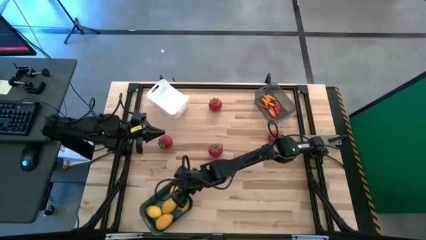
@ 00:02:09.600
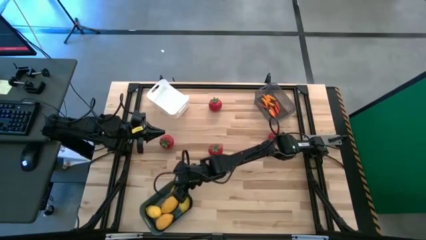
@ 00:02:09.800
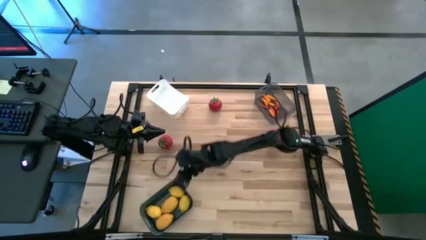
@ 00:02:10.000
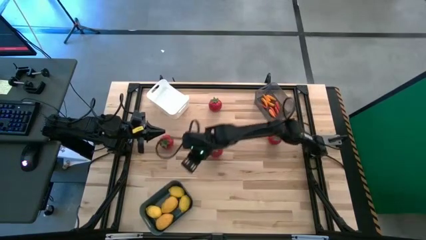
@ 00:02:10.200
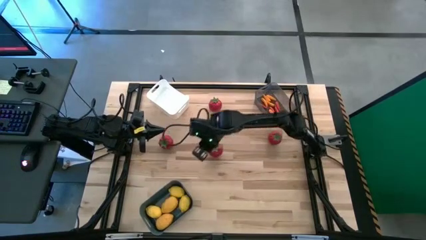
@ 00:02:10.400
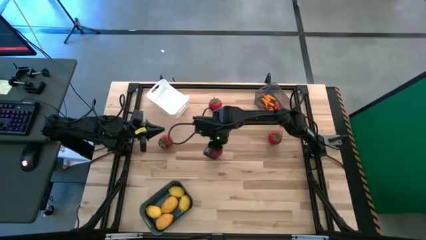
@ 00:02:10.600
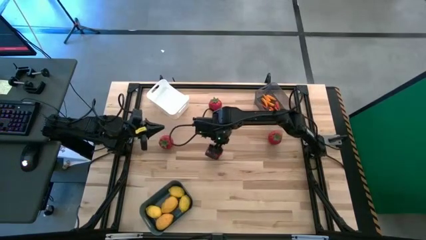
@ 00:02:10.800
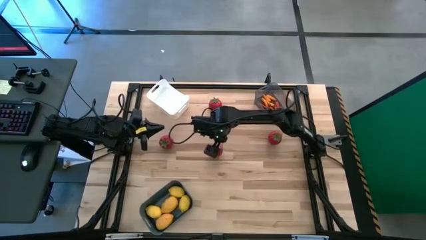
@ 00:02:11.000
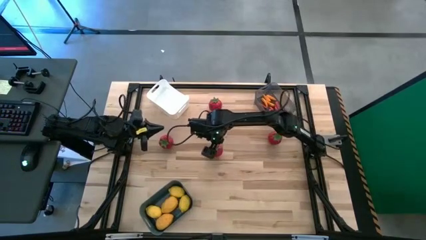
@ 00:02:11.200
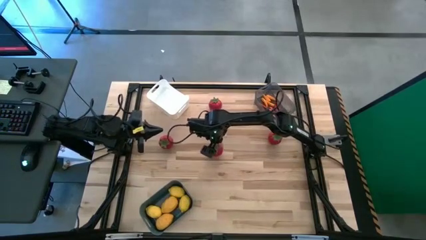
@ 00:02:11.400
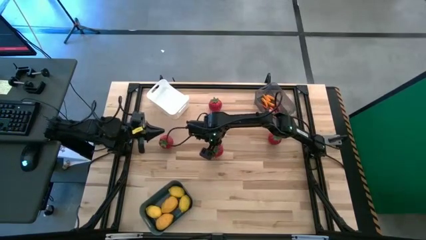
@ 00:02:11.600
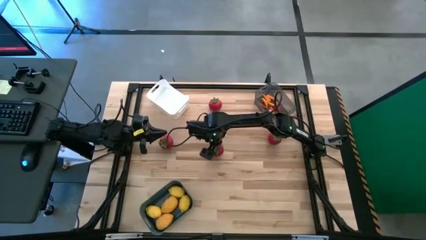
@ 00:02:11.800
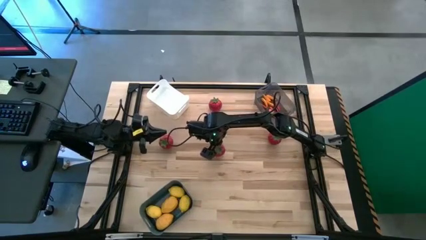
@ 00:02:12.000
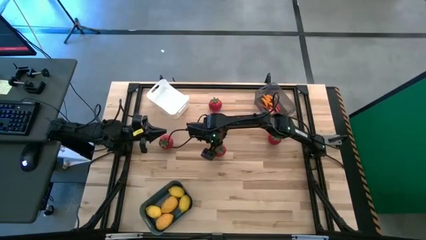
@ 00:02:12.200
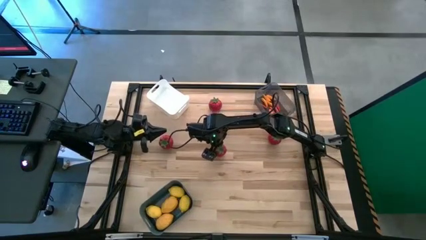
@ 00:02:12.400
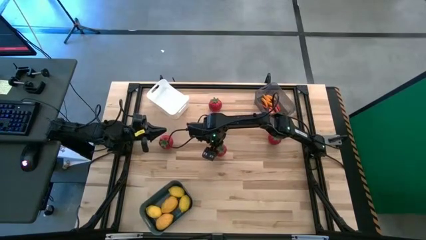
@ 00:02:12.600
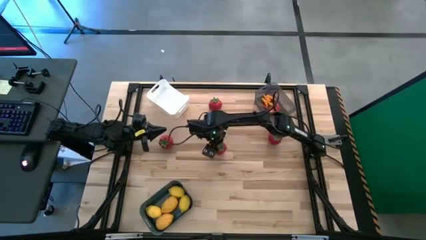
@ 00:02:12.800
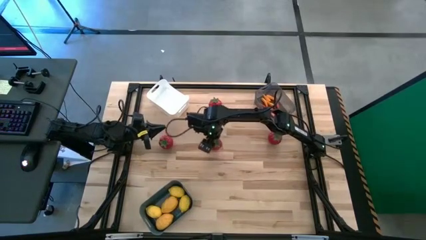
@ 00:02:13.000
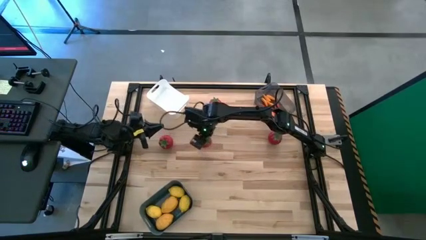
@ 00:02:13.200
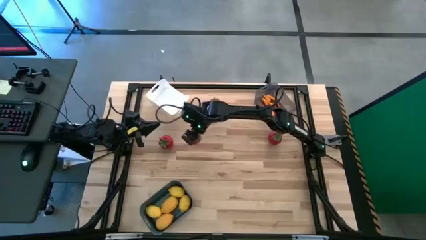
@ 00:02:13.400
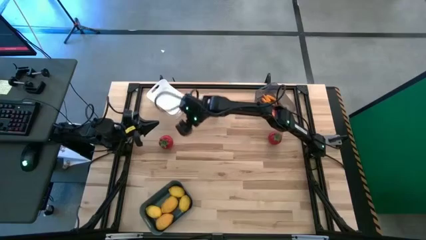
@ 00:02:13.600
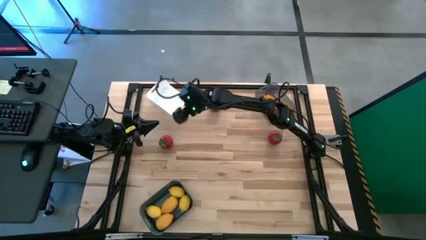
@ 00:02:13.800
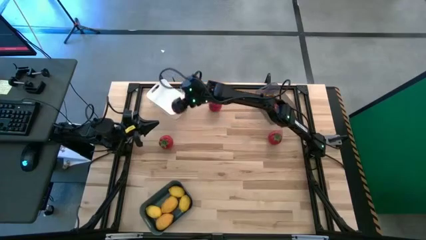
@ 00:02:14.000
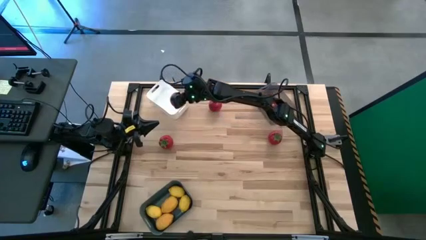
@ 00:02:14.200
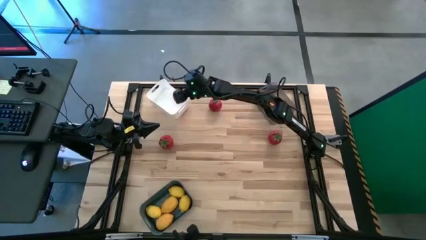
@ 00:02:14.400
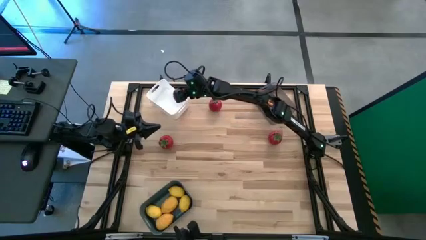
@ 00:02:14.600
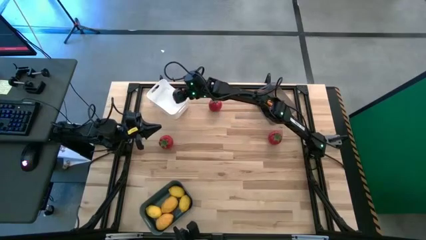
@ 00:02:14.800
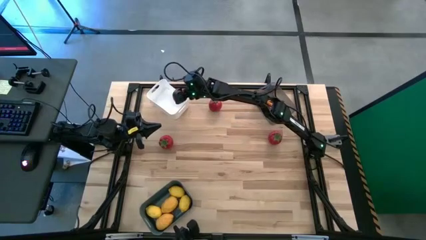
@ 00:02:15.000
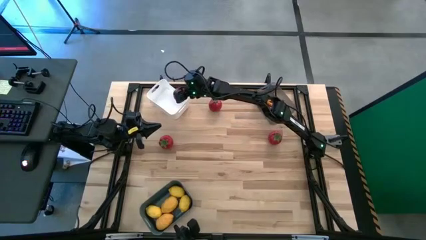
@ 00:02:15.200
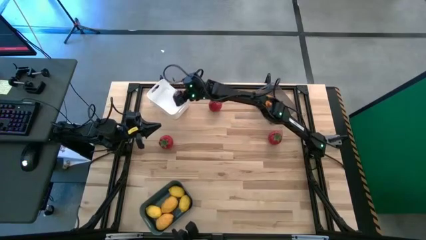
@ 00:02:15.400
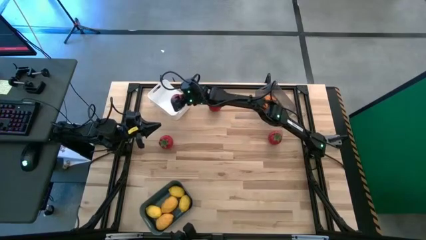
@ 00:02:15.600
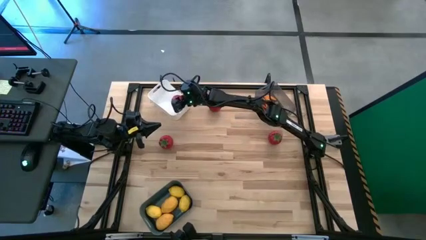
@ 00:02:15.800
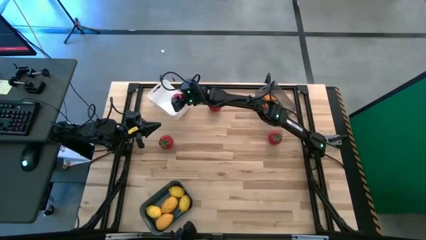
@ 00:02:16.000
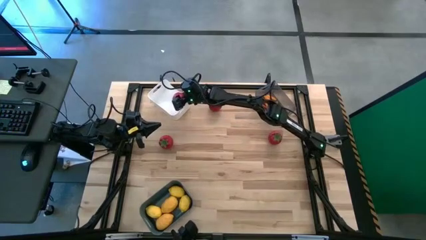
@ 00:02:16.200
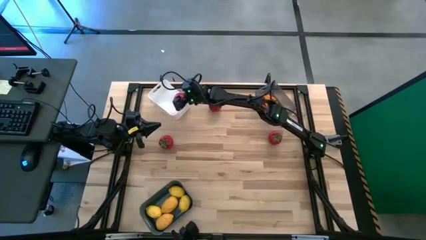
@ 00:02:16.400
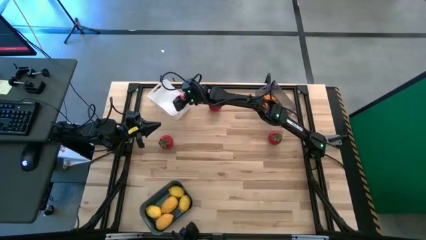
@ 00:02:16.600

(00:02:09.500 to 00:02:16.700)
Task: Sort produce into baskets
Put the tomato into the white bin

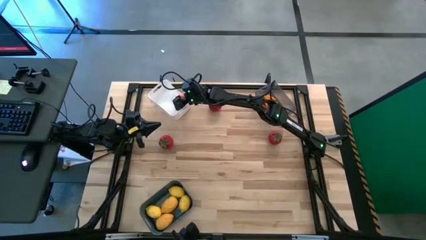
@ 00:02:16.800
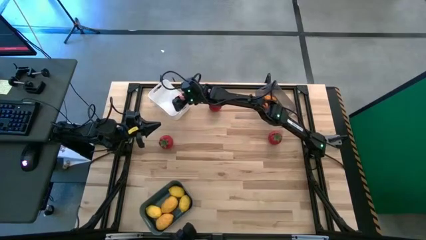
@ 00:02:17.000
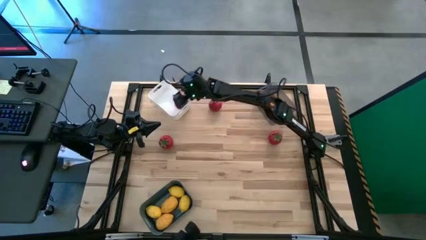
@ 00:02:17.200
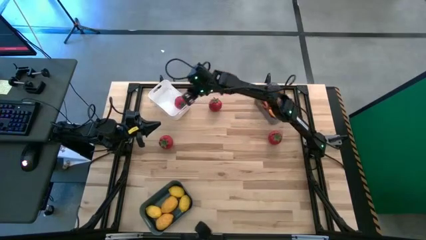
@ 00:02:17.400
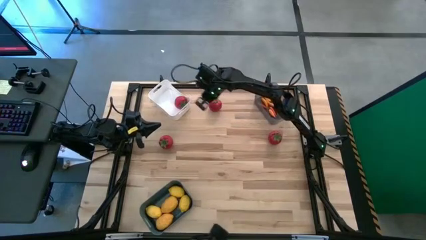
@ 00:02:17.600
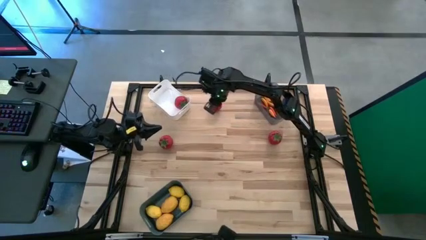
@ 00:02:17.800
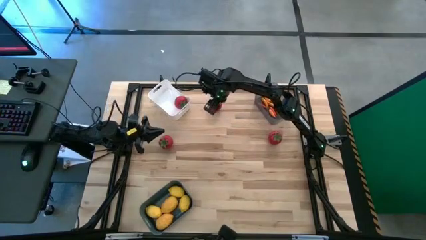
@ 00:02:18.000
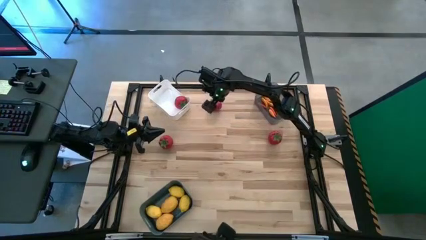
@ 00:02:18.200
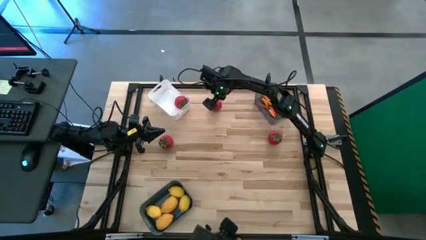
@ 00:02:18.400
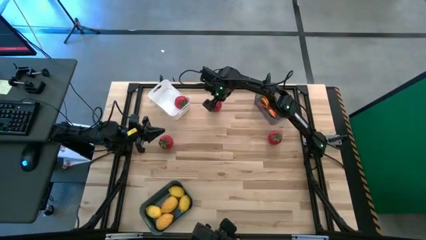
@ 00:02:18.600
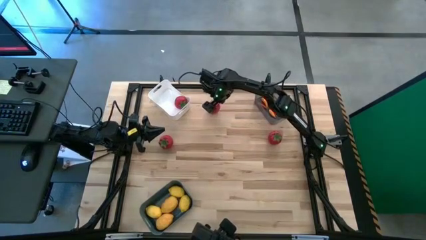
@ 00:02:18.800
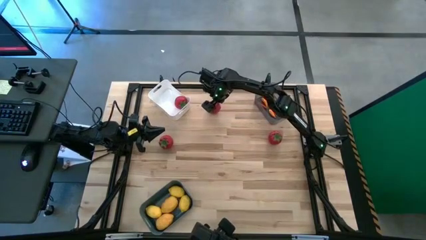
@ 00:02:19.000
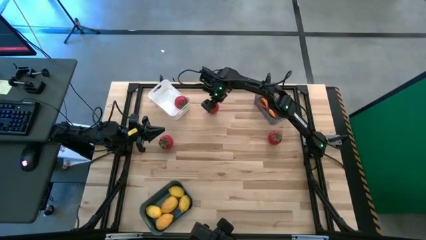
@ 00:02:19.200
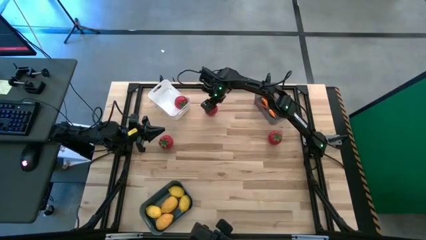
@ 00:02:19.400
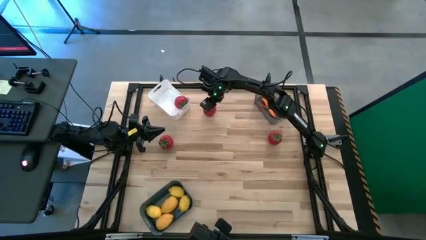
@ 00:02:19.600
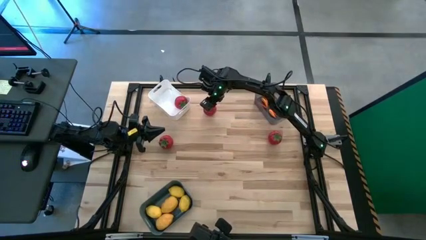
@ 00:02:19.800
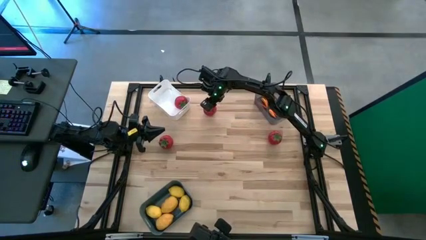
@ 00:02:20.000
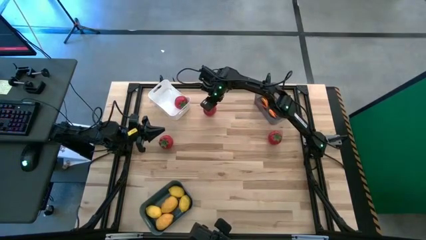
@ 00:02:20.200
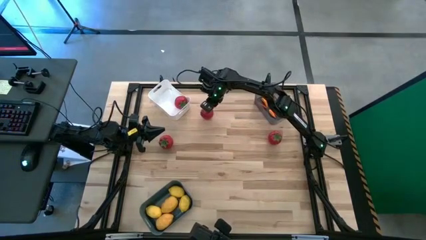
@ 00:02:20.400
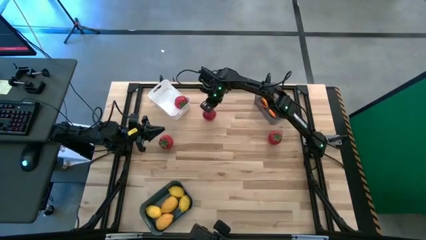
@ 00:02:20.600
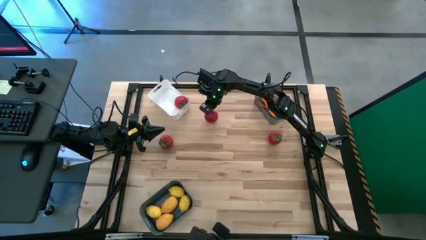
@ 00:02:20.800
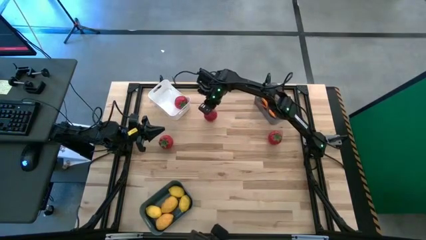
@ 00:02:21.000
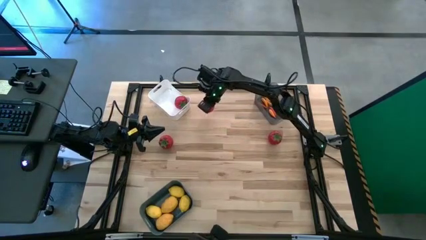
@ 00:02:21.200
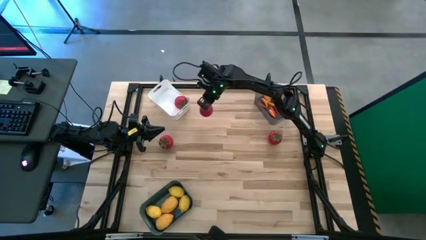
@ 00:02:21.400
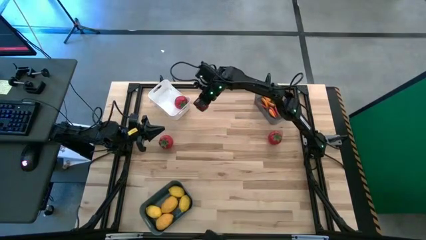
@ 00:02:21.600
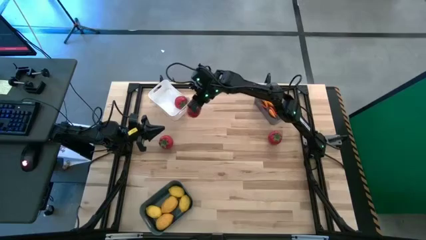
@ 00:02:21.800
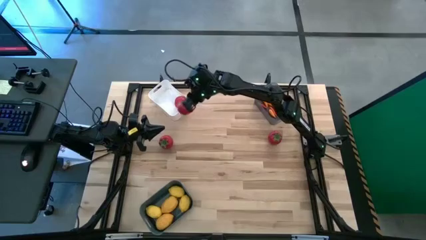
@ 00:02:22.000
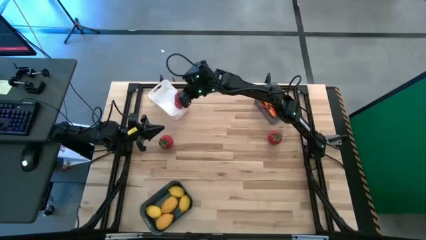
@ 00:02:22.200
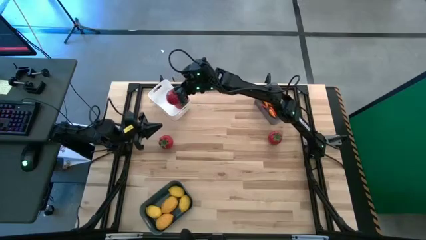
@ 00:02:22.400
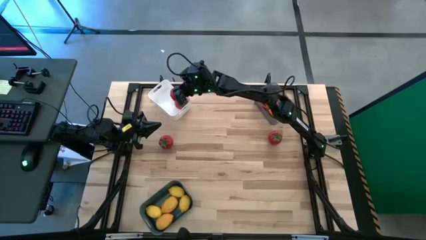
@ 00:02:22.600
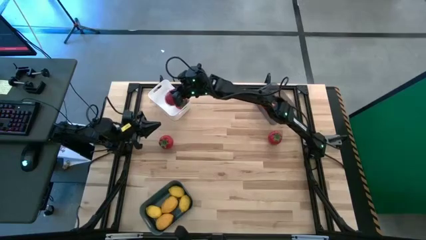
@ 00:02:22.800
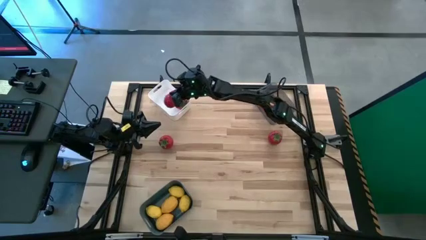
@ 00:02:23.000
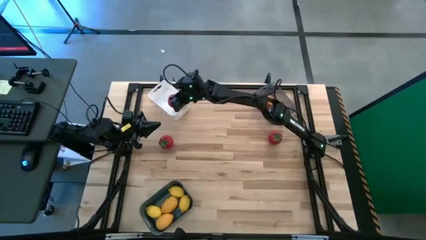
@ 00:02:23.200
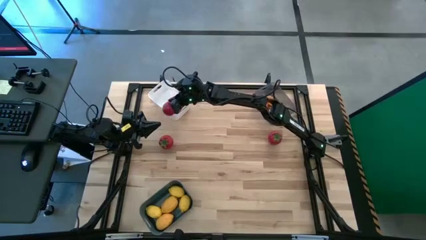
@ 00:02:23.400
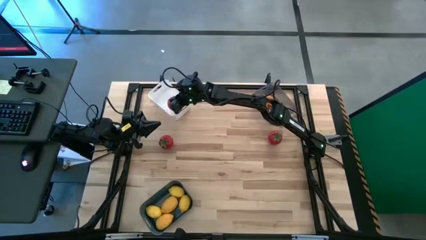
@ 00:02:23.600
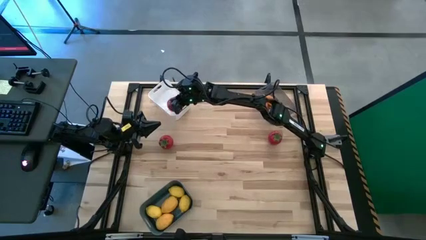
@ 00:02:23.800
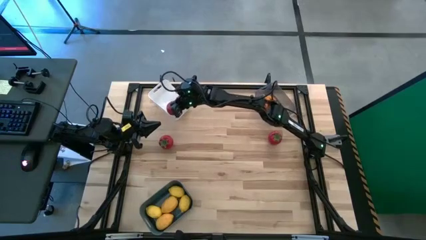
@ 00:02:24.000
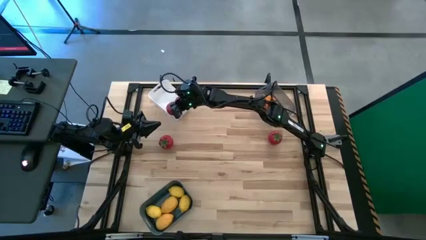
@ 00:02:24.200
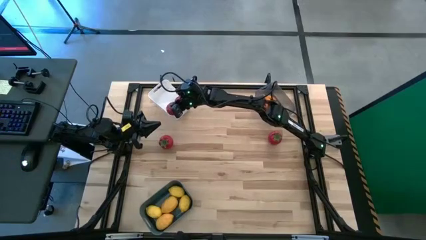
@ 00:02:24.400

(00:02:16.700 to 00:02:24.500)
Put the tomato into the white bin
